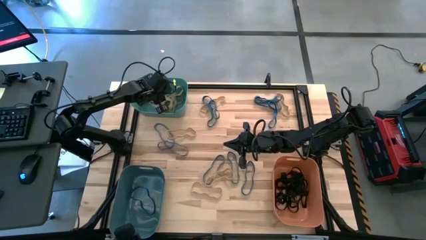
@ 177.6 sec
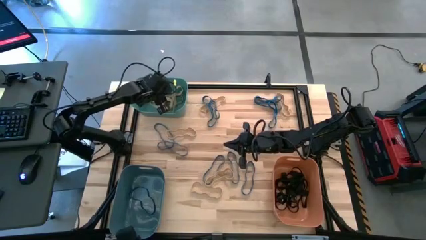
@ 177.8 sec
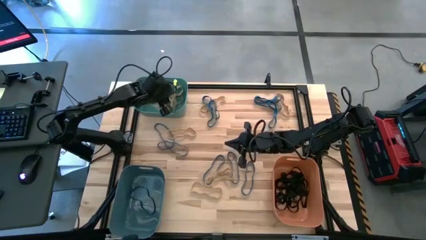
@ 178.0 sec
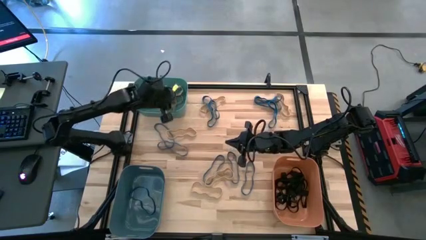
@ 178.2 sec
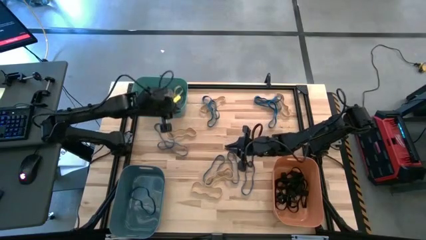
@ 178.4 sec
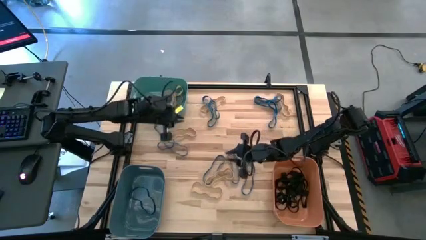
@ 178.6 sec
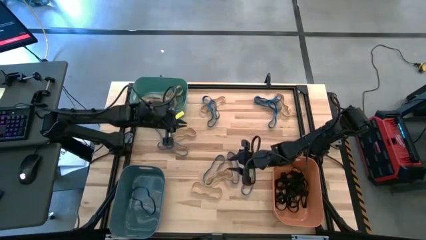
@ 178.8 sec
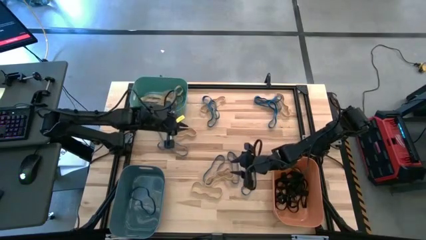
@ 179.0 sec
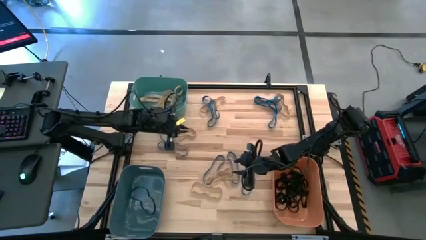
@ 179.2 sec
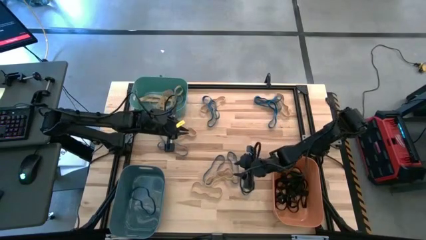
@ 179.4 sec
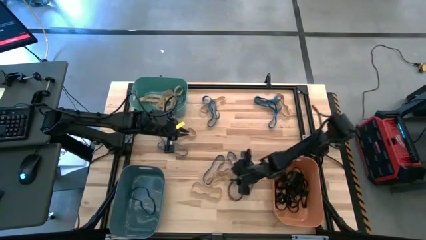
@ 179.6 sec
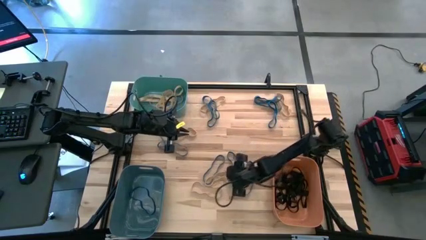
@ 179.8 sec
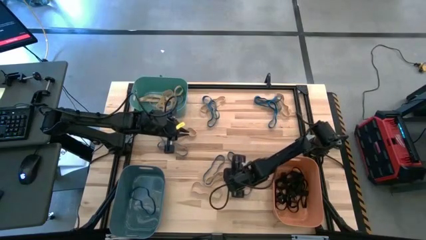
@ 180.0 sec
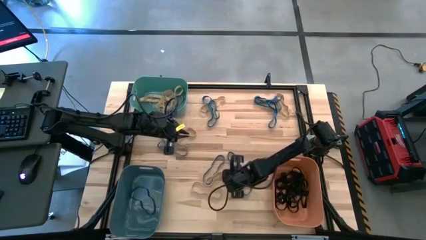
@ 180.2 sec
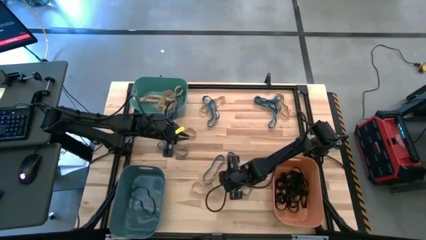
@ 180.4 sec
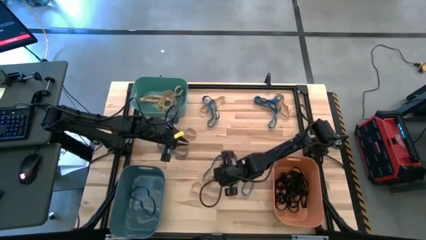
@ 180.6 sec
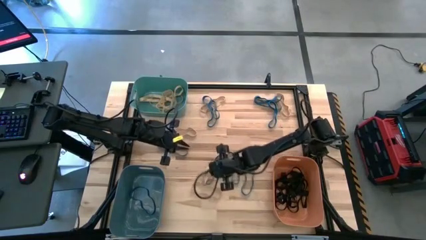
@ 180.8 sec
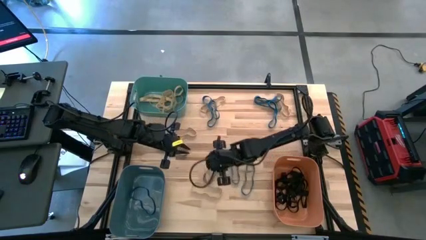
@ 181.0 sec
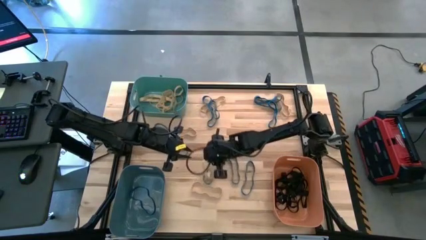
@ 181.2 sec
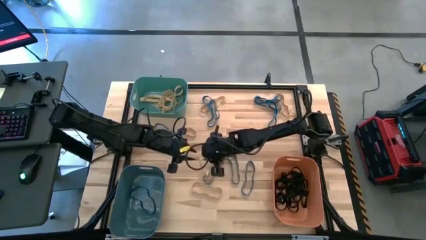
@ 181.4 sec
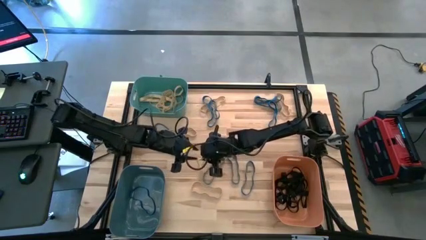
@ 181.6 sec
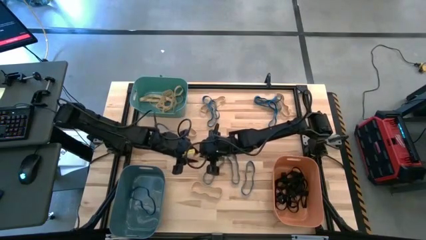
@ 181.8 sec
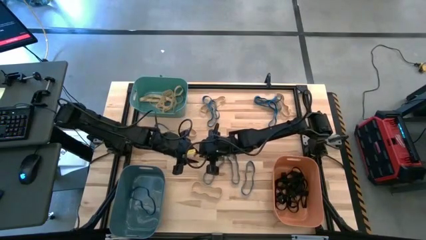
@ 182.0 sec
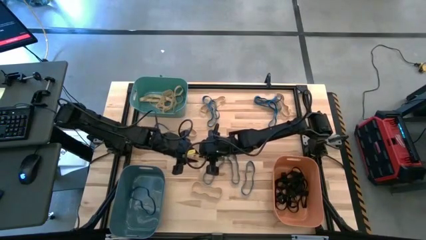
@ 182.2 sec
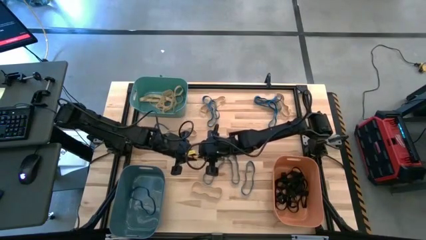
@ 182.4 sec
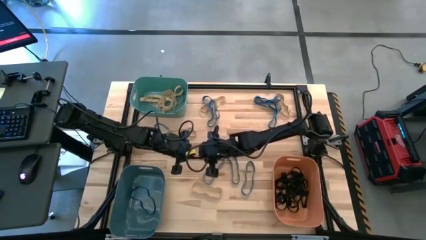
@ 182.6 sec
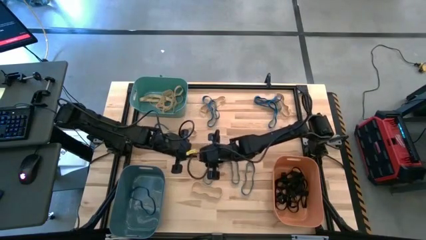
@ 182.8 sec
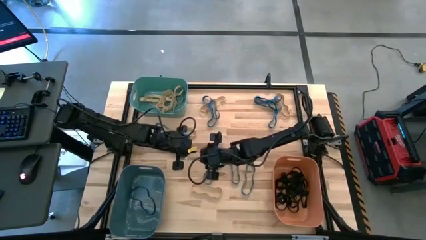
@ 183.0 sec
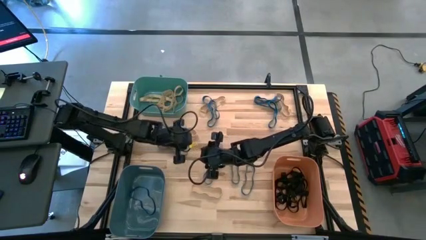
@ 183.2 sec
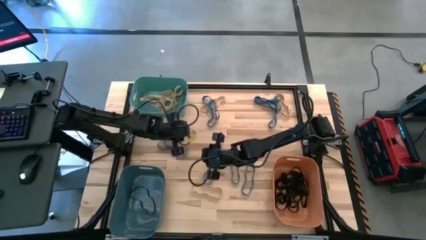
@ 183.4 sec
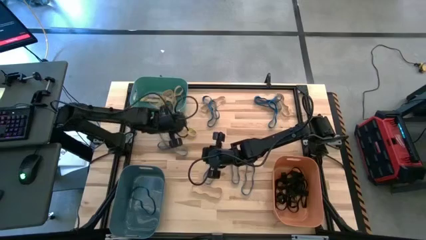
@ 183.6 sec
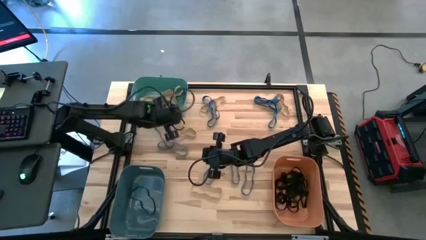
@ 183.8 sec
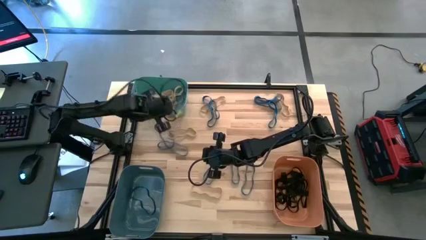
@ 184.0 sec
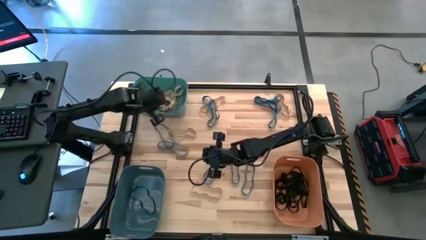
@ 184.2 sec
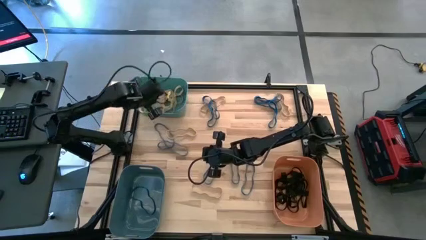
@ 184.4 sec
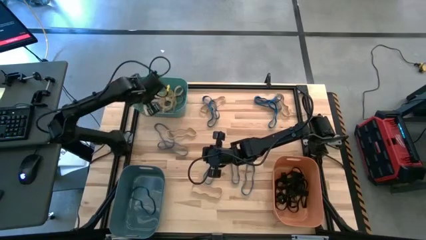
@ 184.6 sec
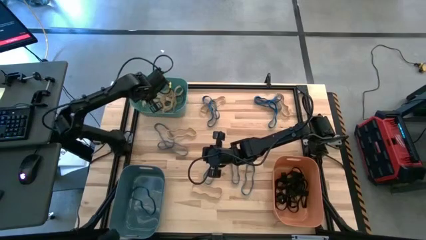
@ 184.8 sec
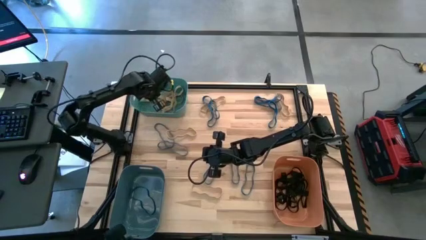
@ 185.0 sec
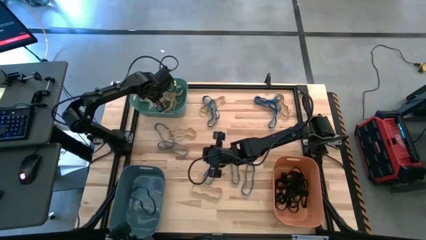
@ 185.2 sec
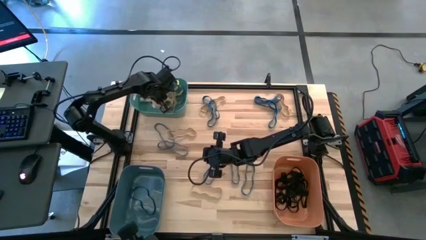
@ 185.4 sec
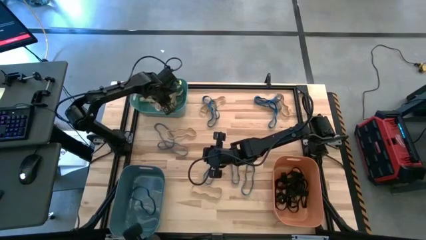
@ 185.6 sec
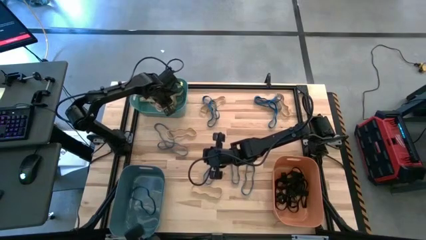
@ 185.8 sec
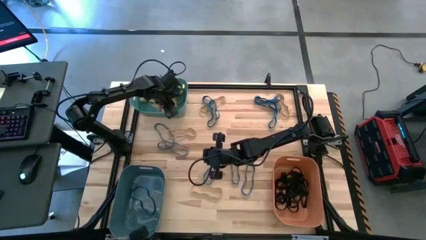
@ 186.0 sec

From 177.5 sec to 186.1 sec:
Task: Sort rubber bands into baskets
Put the brown rubber band into the green bin

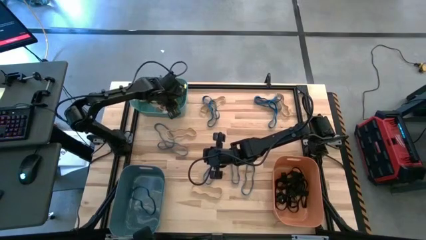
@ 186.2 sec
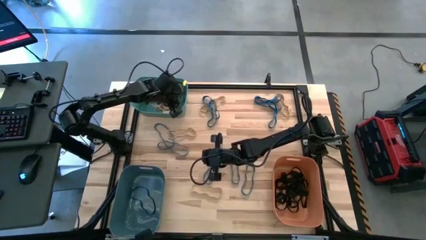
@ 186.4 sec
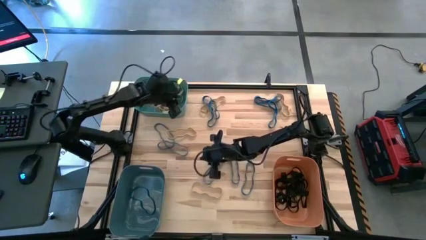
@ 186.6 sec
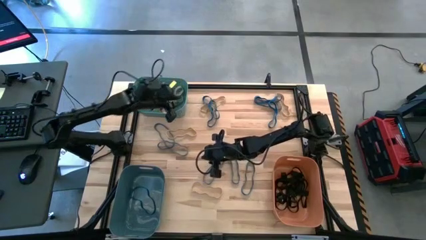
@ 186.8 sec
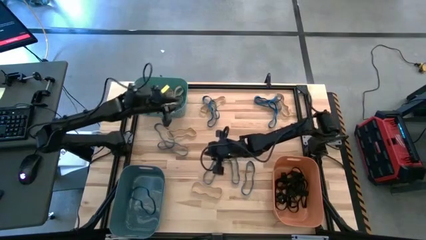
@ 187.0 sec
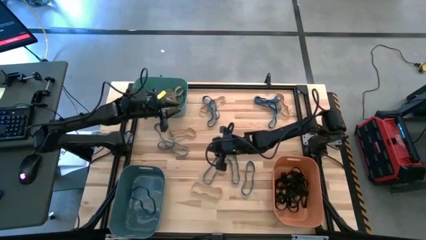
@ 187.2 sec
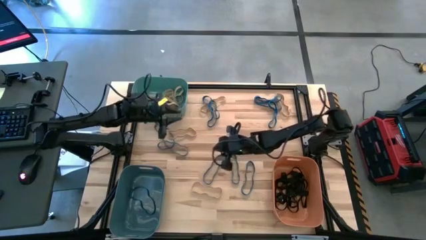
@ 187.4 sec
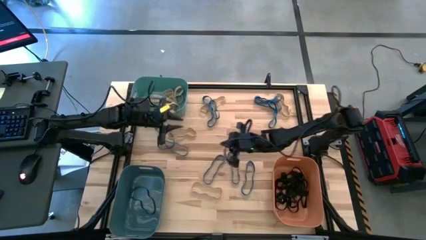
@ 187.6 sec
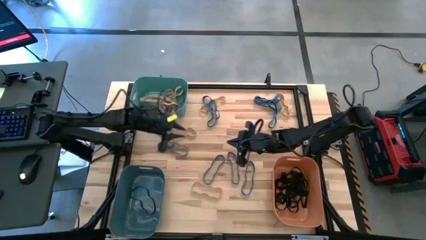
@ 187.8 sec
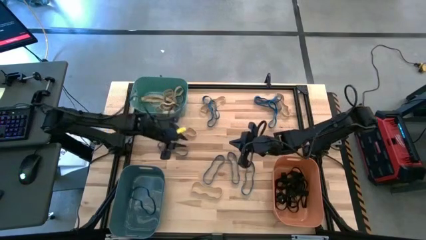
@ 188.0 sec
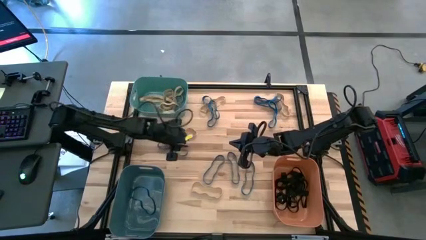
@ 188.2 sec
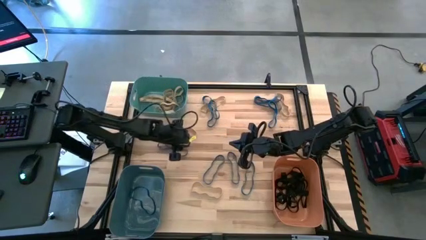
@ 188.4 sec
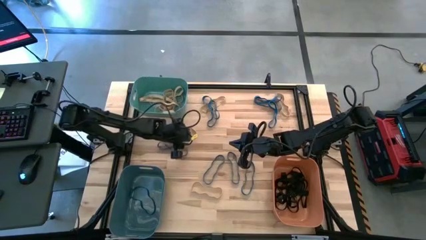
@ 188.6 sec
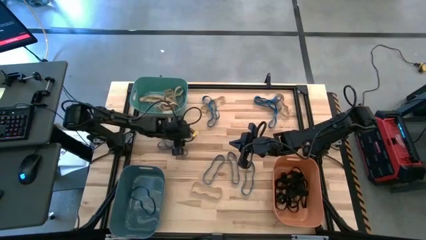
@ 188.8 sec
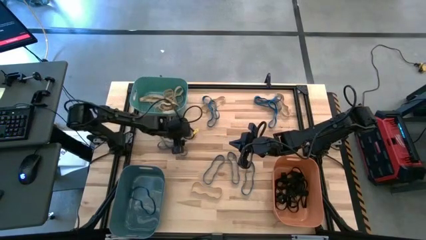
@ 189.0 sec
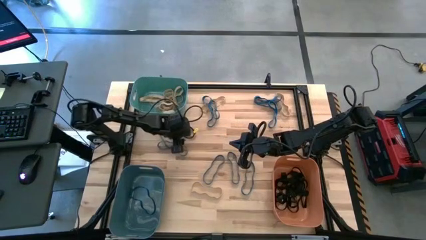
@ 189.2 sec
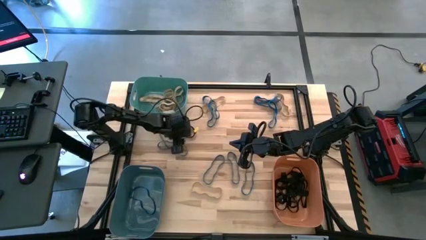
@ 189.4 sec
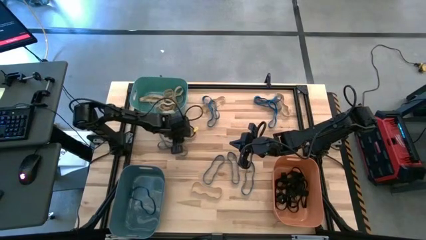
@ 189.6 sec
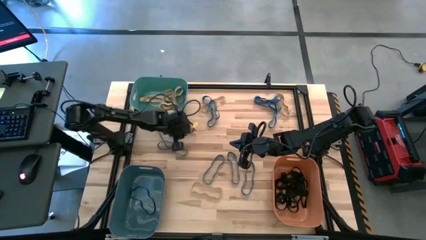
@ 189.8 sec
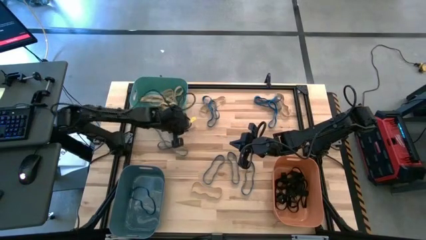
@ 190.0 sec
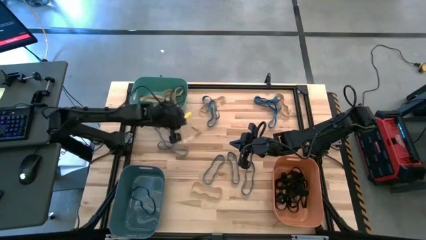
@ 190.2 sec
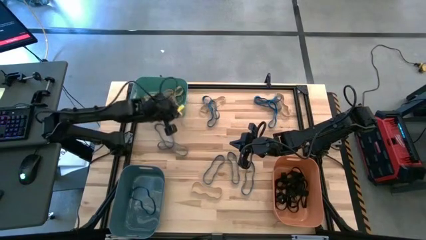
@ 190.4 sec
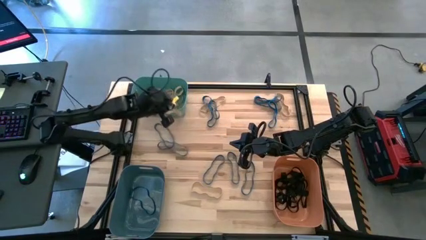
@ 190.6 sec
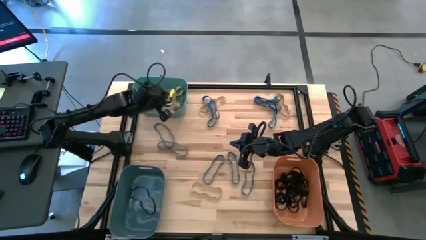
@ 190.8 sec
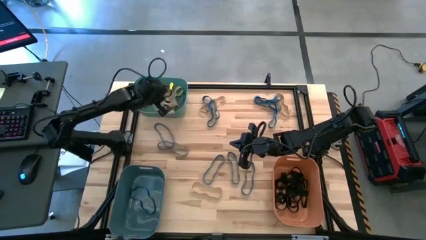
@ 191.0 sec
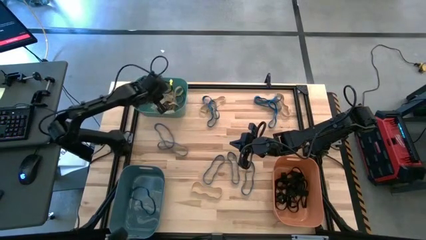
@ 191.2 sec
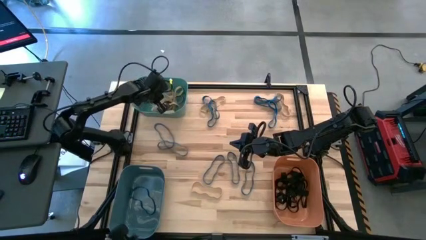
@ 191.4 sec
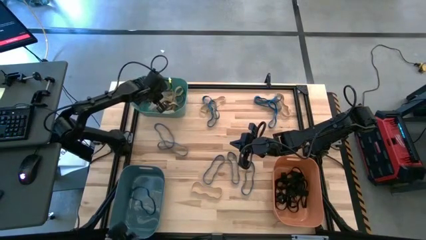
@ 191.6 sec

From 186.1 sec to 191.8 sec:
Put the brown rubber band into the green bin

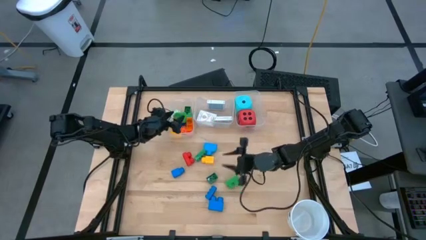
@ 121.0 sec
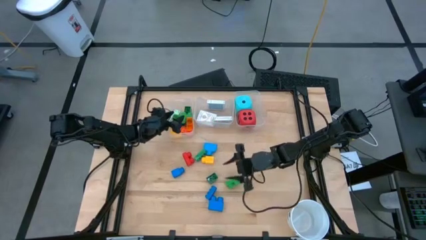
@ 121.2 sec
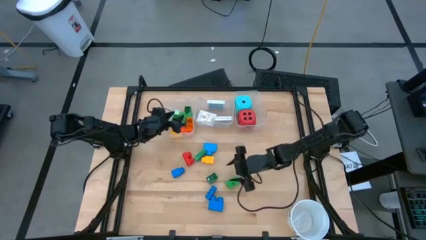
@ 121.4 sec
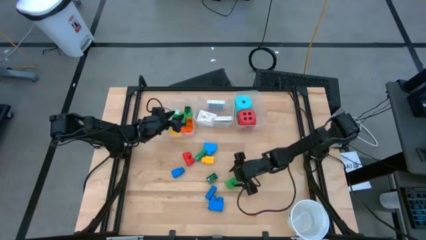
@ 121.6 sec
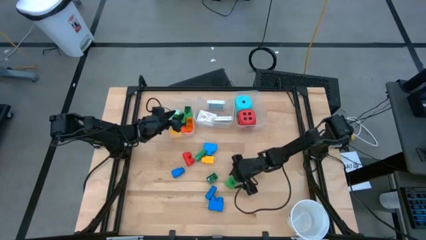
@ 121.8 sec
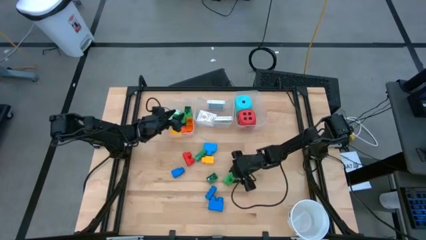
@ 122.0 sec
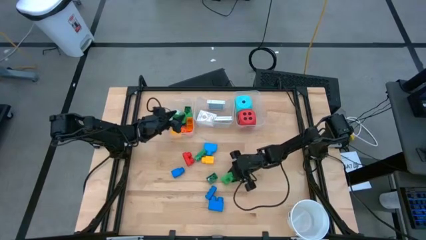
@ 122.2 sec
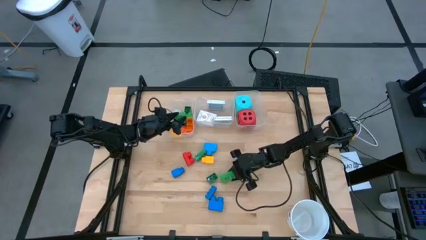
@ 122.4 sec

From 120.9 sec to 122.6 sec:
Task: Pick & Place Toys
Put the green game piece into the left transparent bin
